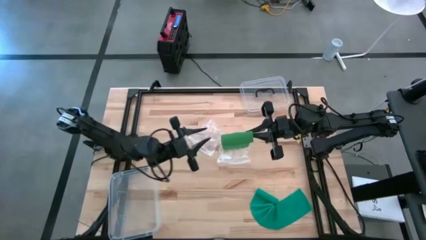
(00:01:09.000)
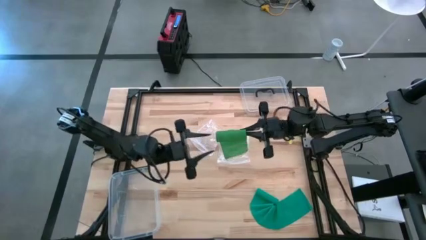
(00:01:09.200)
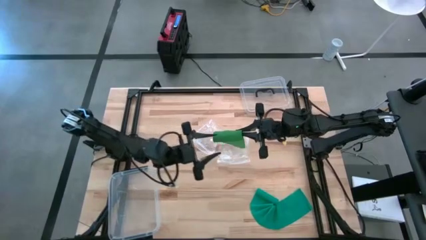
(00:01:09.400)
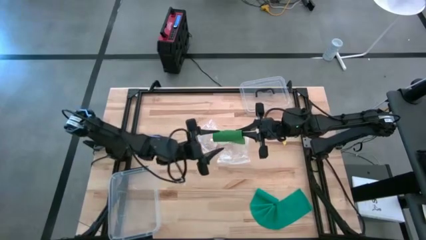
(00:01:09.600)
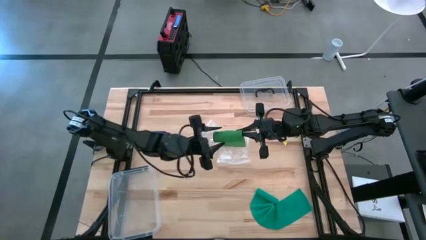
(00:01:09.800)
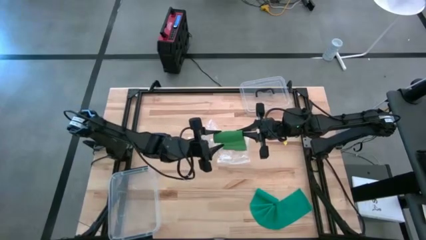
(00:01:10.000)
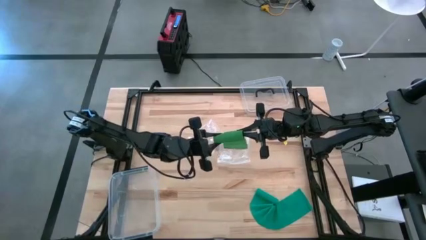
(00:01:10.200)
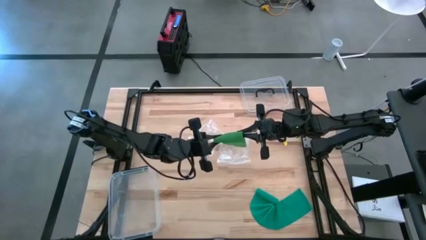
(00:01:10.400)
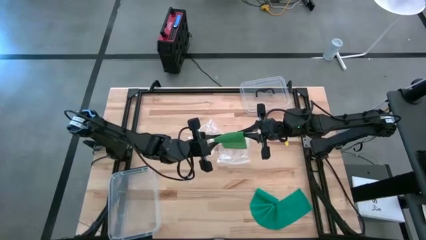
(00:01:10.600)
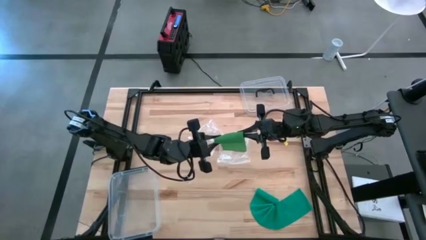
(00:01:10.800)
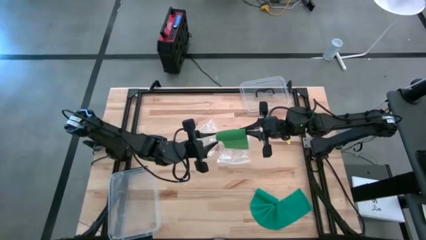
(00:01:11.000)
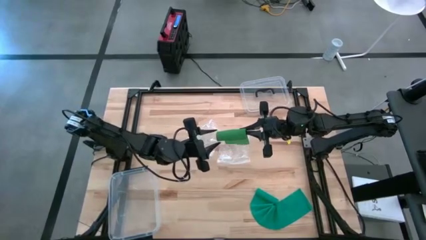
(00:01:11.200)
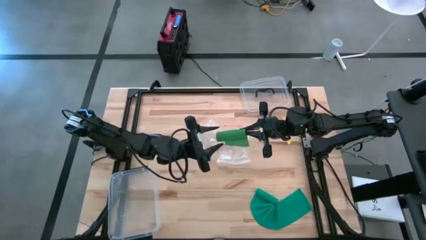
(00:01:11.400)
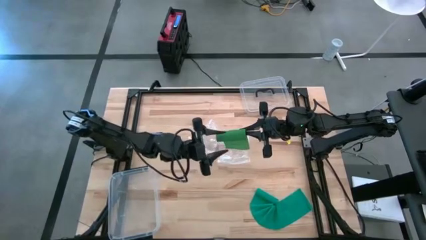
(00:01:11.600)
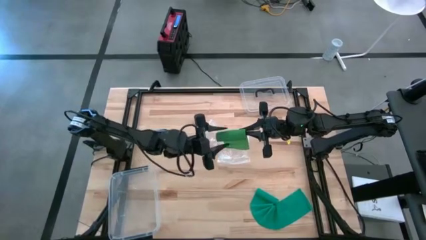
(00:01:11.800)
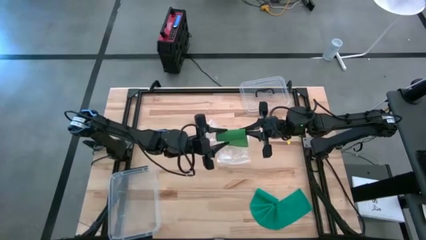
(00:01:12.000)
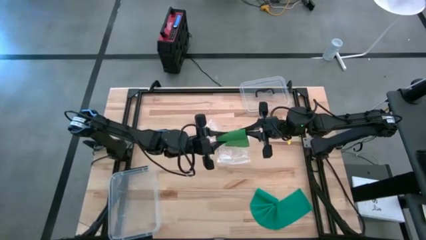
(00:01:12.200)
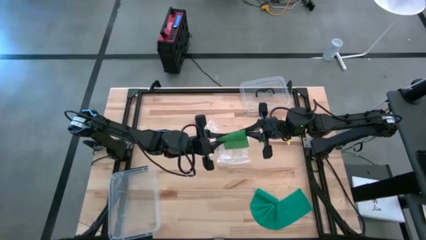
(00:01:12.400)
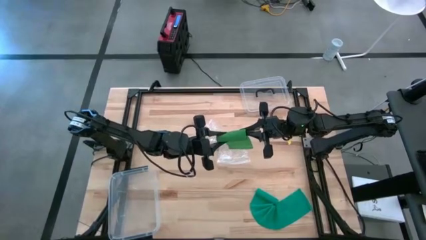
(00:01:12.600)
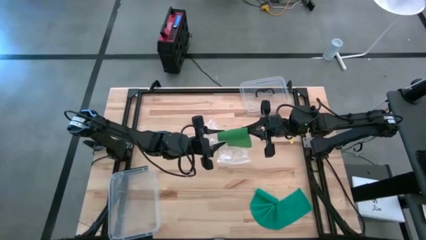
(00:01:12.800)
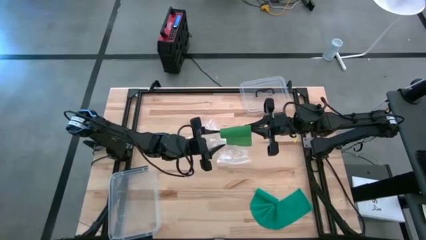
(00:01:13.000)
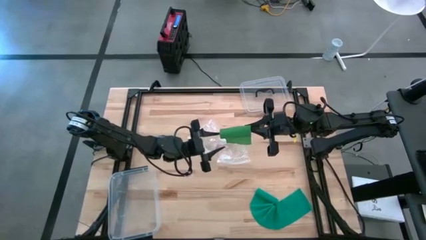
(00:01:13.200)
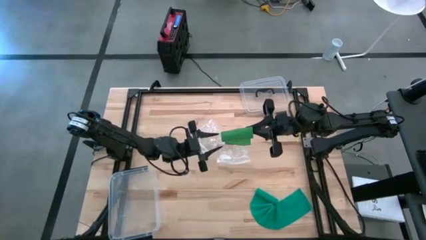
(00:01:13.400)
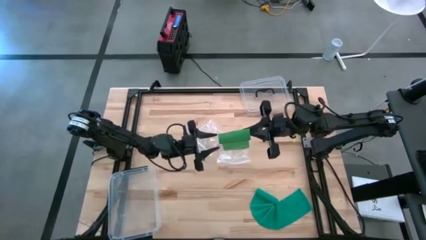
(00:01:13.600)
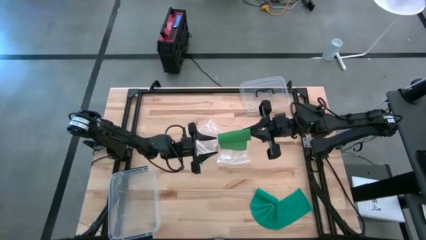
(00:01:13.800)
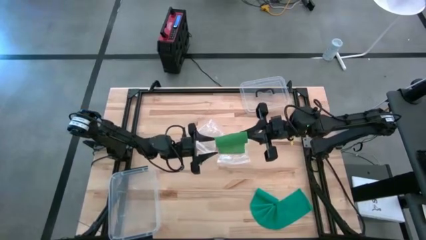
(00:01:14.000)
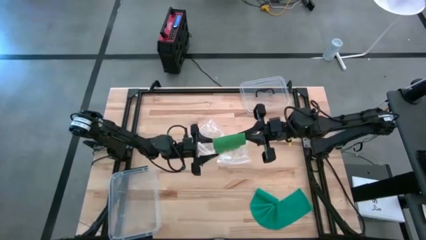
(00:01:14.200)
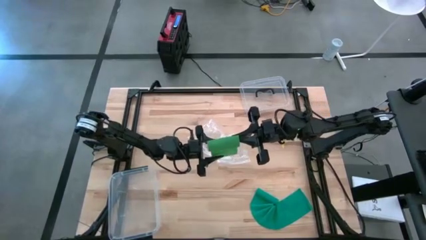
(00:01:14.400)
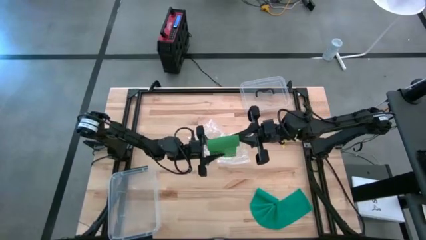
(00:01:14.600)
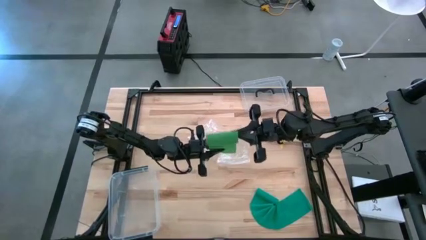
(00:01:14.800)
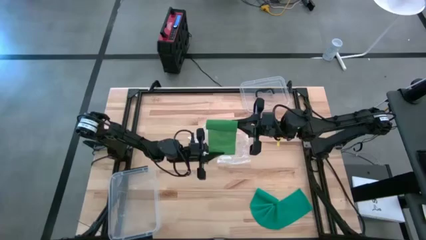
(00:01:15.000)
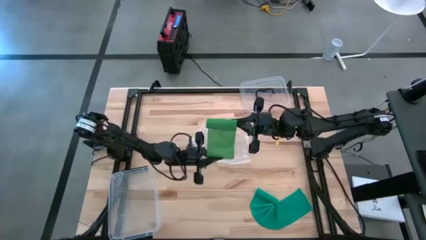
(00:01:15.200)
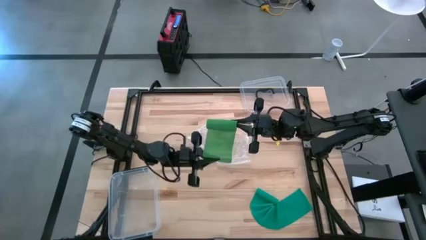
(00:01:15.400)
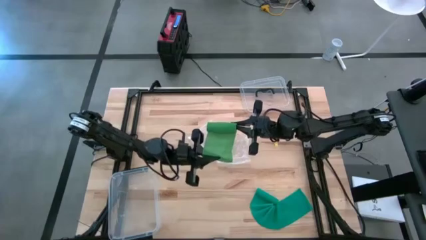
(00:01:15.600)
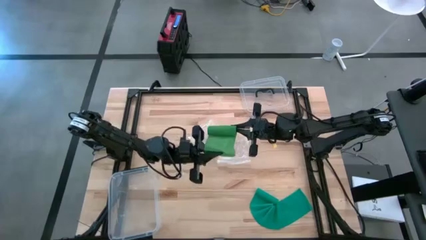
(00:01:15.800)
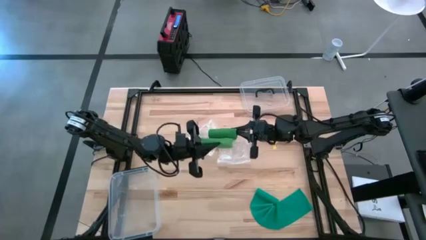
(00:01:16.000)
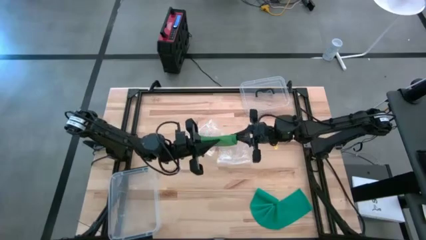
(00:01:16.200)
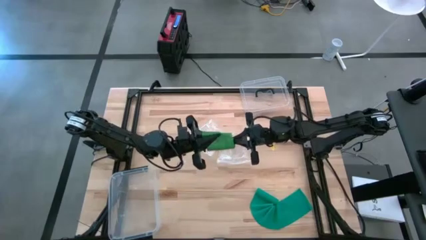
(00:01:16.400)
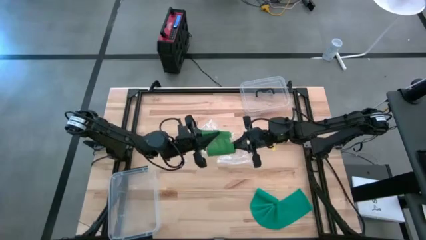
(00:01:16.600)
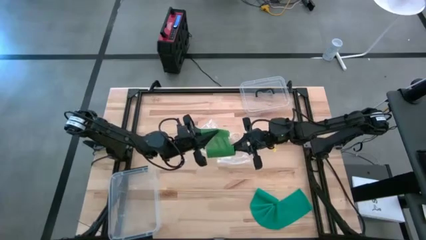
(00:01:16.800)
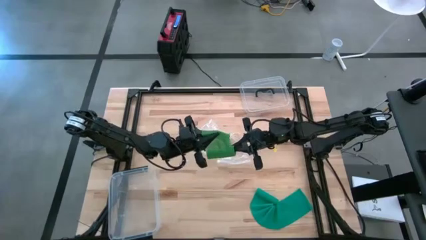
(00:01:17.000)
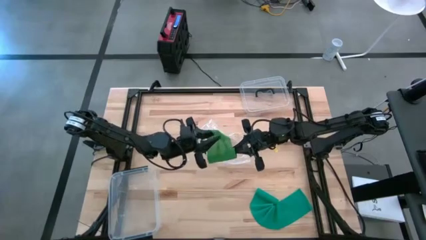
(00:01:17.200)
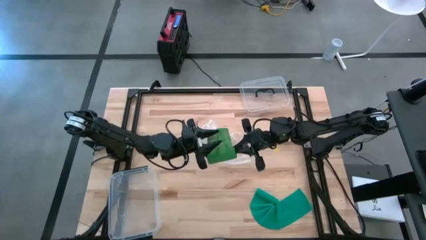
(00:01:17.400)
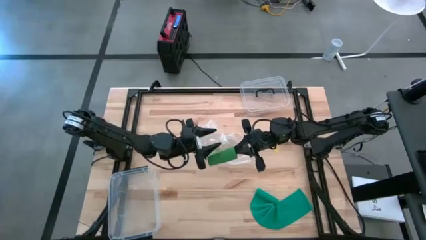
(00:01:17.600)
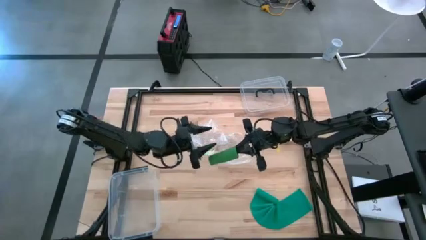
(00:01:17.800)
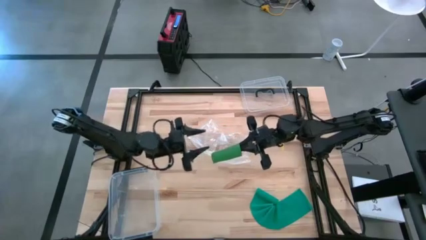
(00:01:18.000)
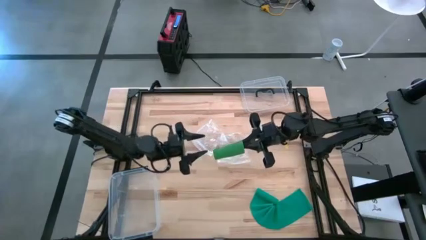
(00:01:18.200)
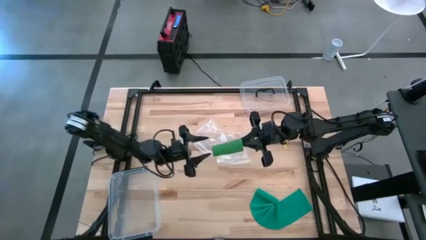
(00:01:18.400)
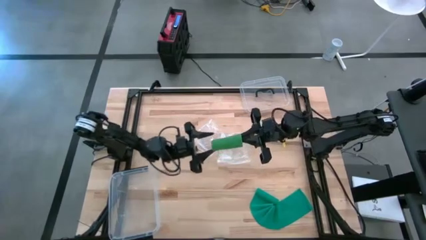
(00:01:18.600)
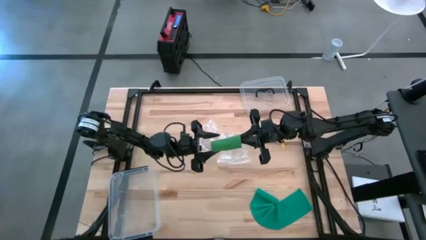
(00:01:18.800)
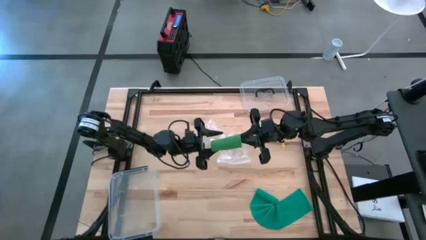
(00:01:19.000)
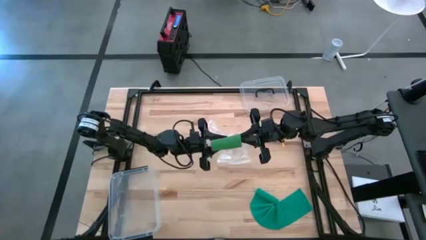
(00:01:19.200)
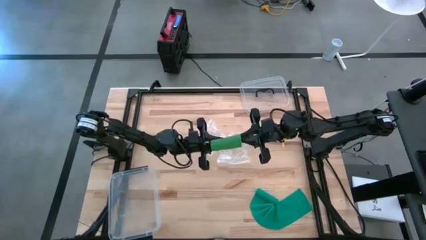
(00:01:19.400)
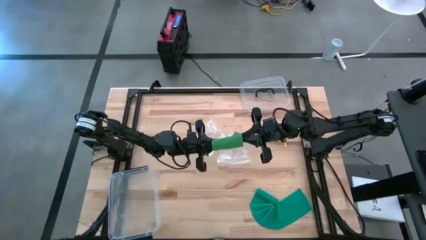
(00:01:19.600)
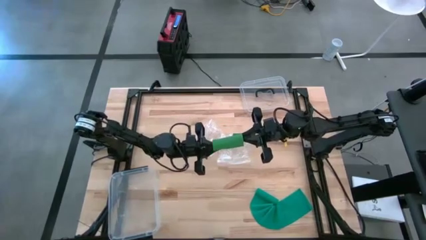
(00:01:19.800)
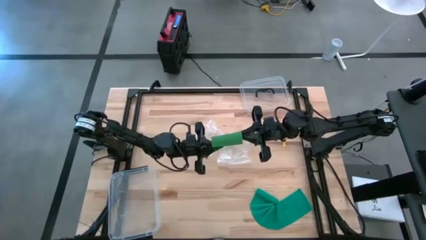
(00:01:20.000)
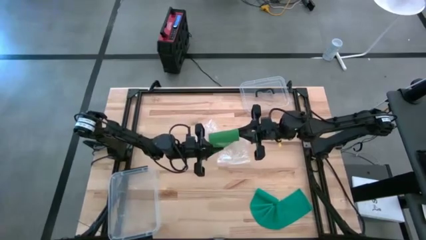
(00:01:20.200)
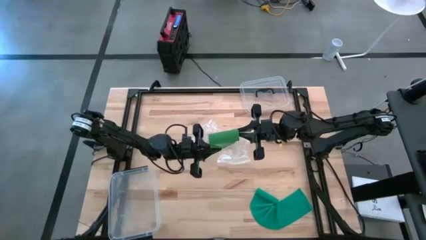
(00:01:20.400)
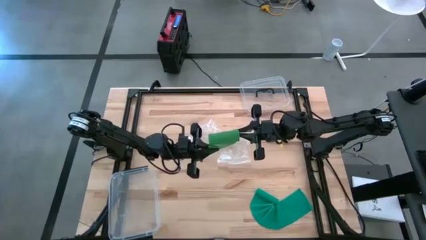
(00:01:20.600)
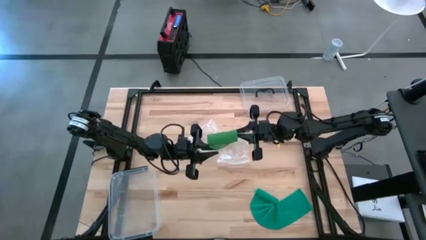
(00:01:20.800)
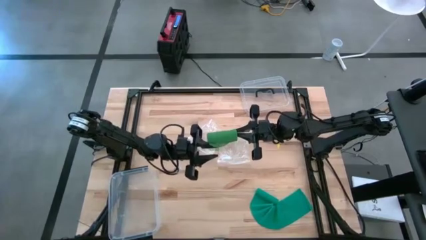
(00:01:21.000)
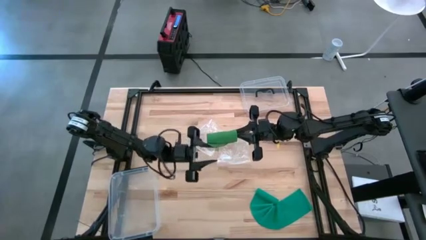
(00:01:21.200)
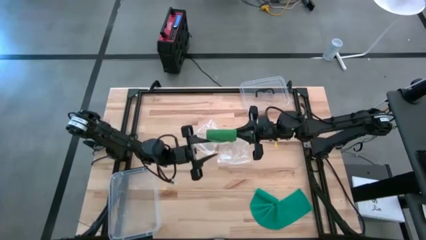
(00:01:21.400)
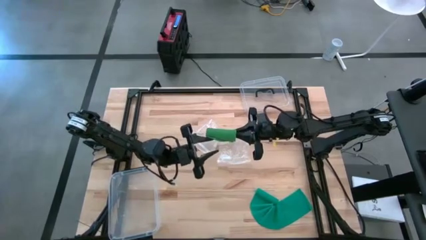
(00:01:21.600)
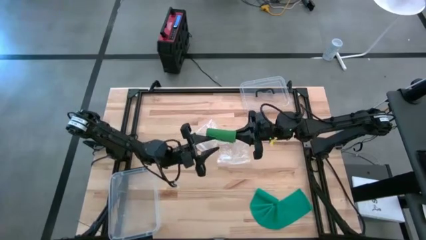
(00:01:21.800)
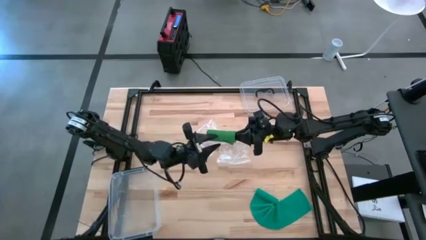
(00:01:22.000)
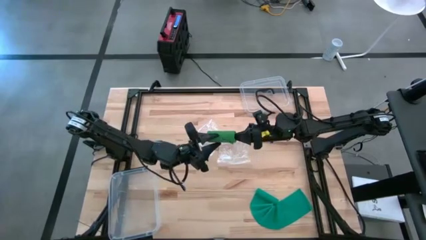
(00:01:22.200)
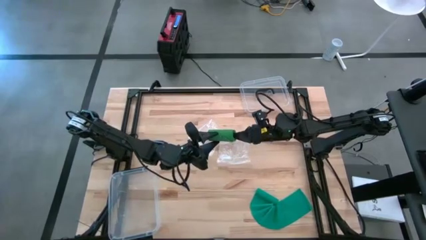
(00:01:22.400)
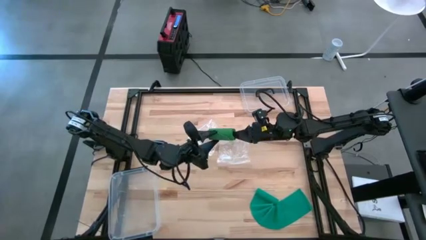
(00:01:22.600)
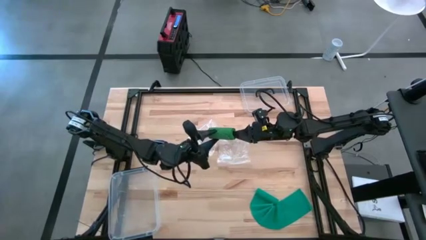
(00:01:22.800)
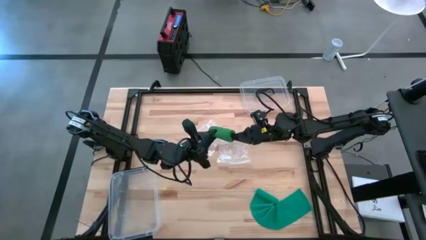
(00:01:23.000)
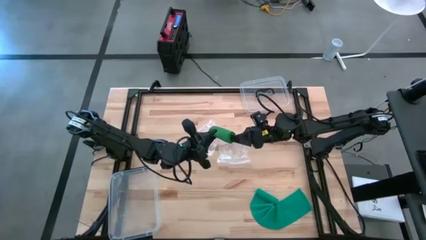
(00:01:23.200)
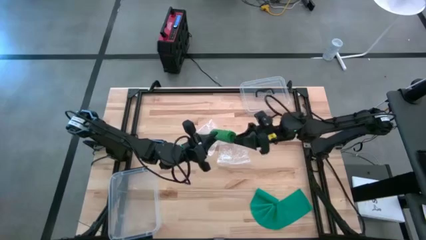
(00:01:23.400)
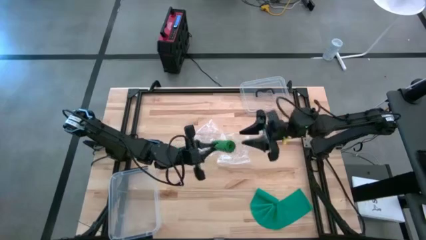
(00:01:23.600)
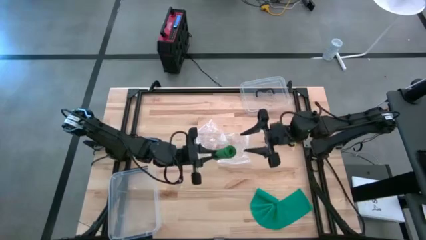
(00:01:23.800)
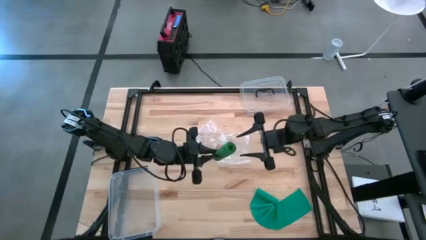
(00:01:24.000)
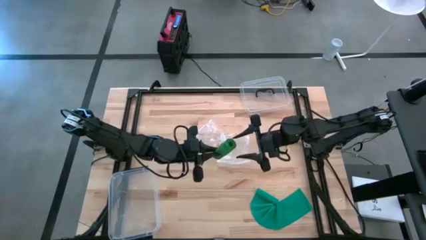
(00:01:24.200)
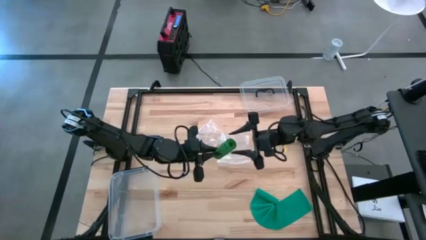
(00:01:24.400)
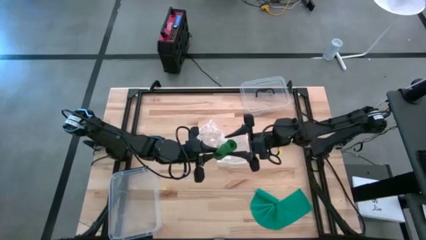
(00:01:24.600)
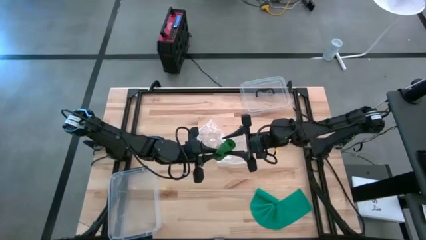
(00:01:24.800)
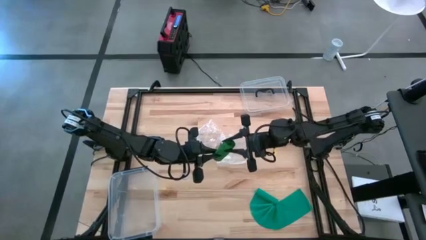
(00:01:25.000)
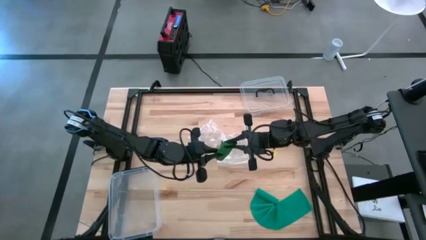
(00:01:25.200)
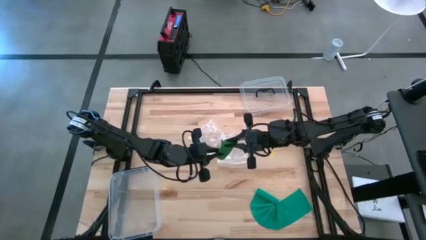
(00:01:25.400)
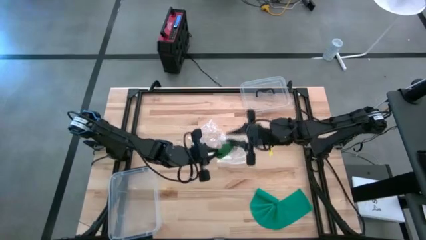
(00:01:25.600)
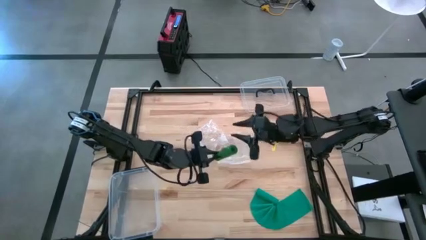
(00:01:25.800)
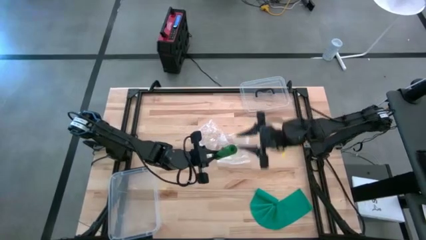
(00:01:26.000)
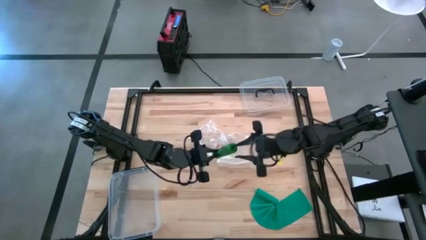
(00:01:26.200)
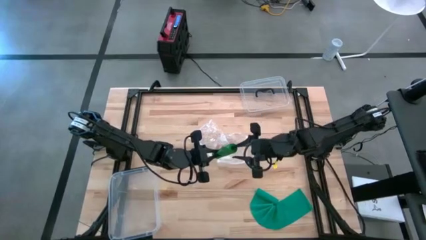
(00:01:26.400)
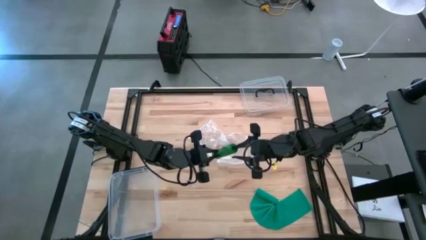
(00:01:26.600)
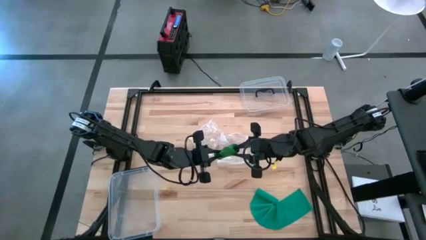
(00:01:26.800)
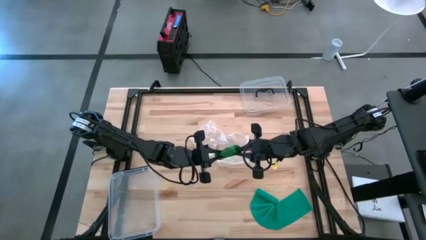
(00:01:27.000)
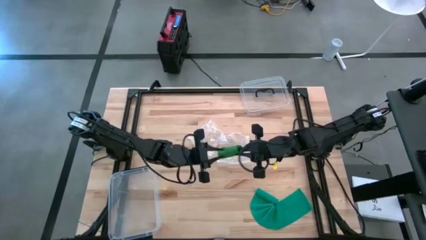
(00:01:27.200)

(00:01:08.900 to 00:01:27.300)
Task: Roll bandage
Roll the green bandage
